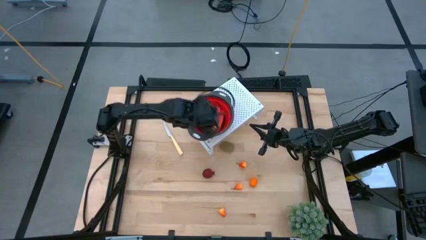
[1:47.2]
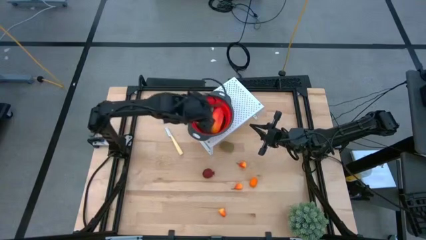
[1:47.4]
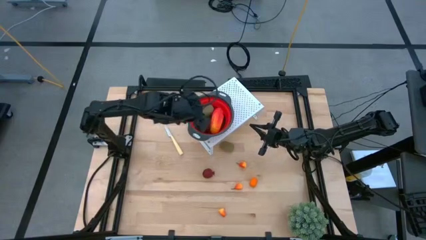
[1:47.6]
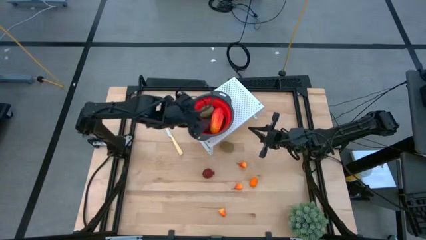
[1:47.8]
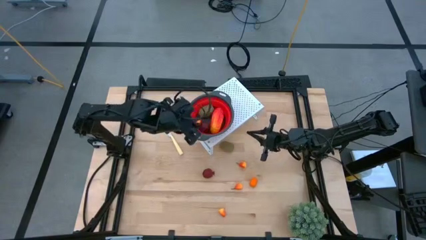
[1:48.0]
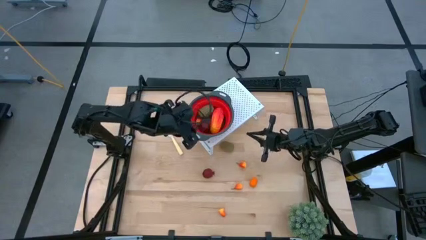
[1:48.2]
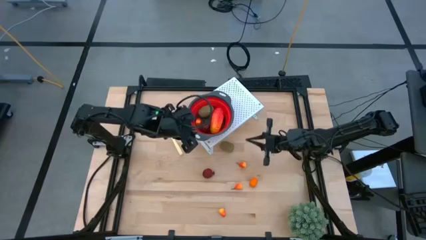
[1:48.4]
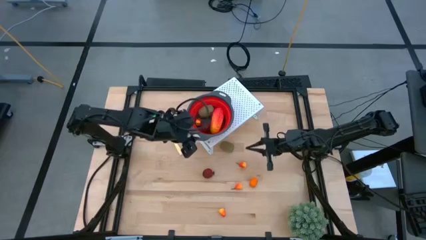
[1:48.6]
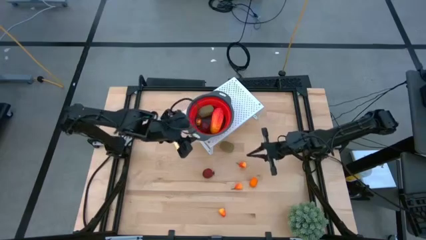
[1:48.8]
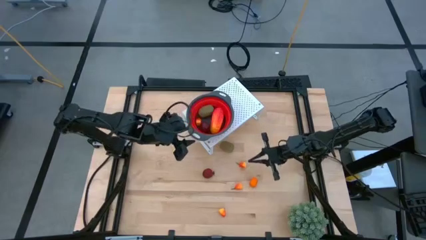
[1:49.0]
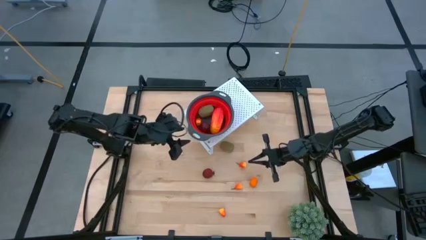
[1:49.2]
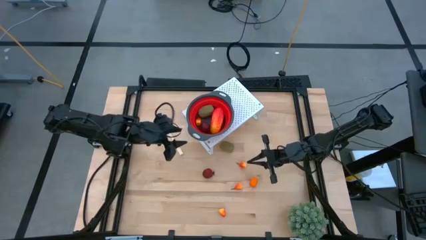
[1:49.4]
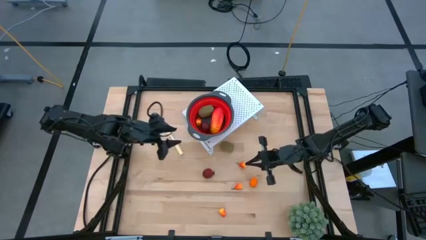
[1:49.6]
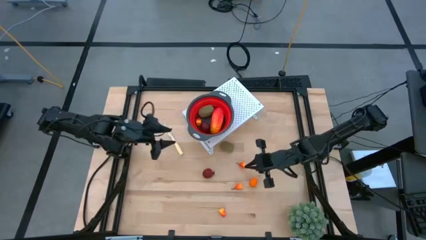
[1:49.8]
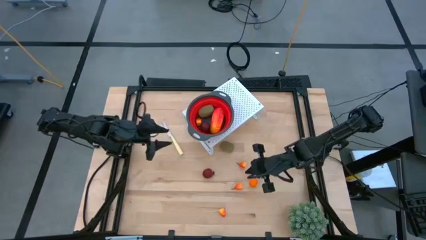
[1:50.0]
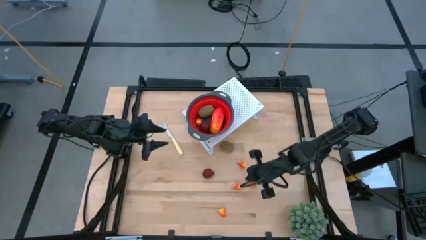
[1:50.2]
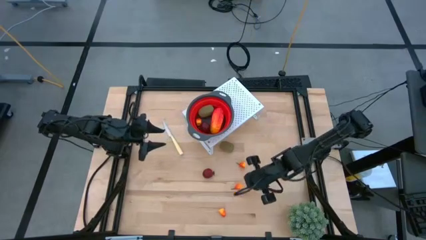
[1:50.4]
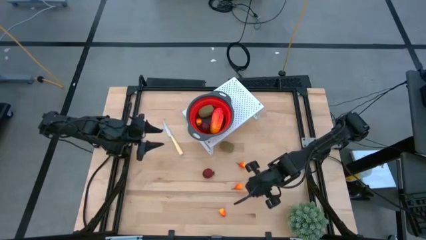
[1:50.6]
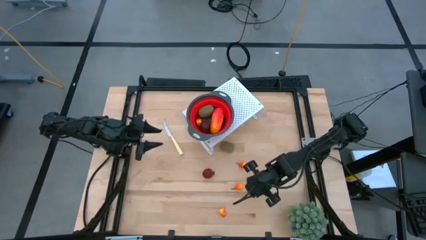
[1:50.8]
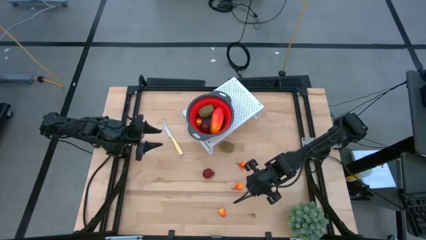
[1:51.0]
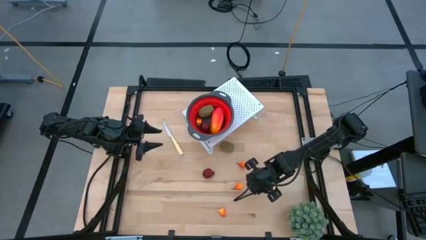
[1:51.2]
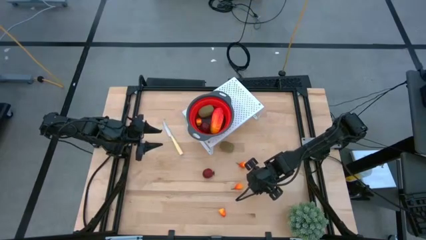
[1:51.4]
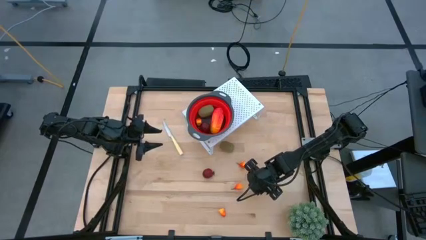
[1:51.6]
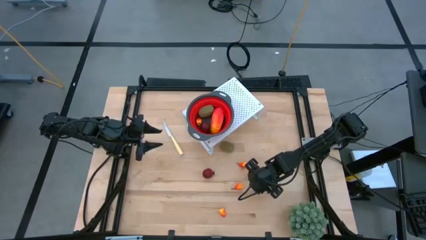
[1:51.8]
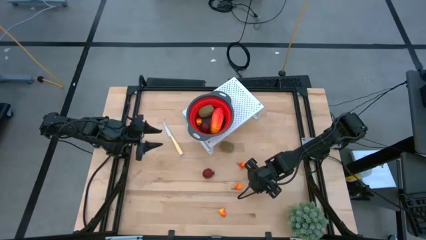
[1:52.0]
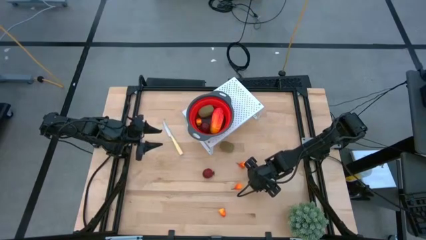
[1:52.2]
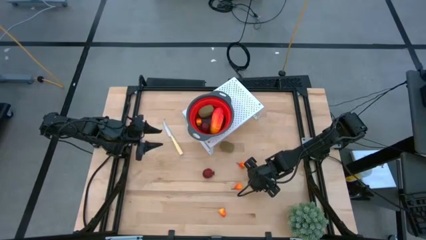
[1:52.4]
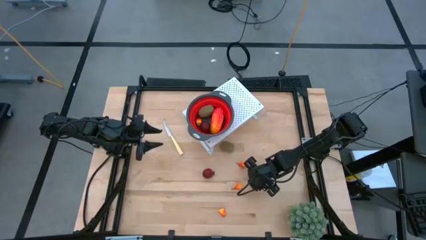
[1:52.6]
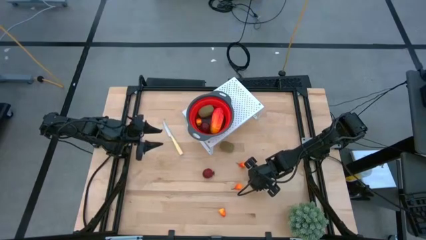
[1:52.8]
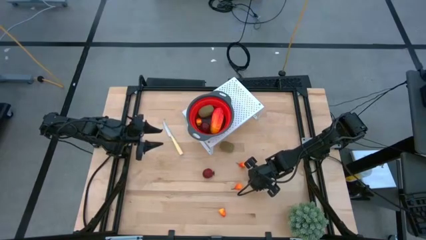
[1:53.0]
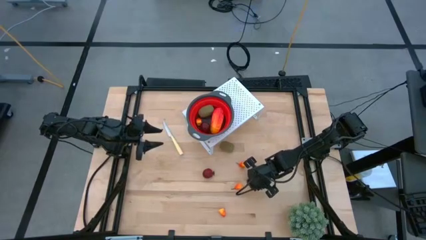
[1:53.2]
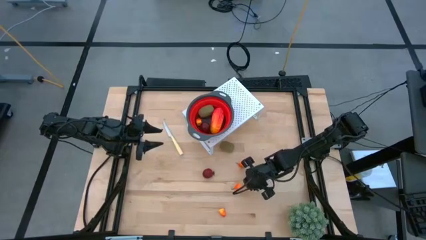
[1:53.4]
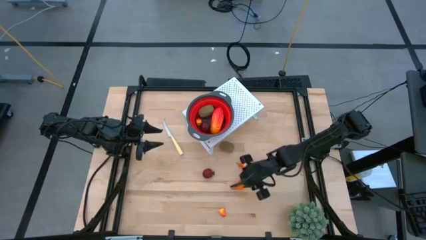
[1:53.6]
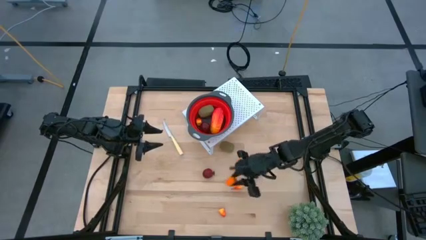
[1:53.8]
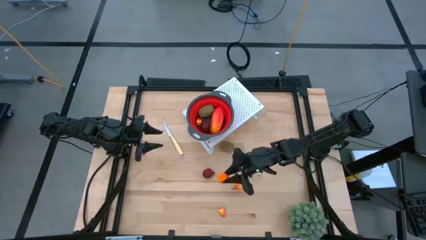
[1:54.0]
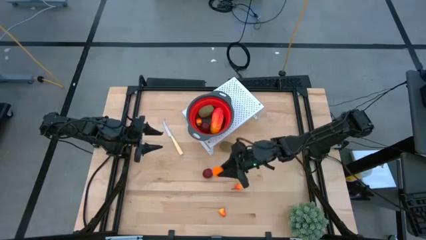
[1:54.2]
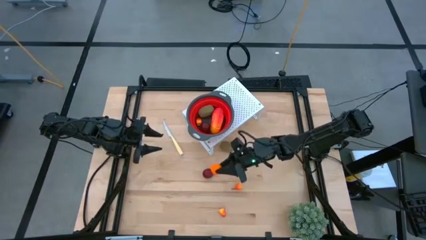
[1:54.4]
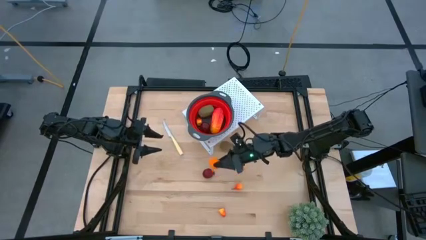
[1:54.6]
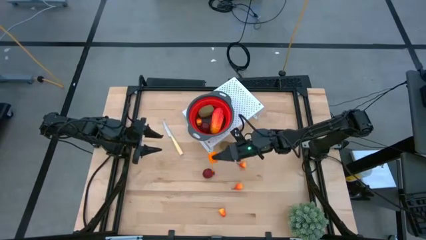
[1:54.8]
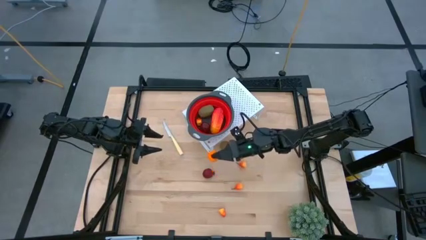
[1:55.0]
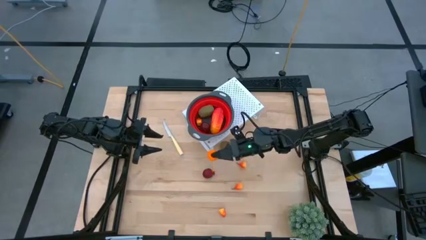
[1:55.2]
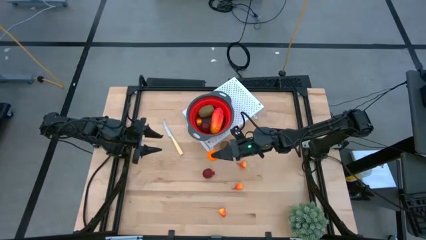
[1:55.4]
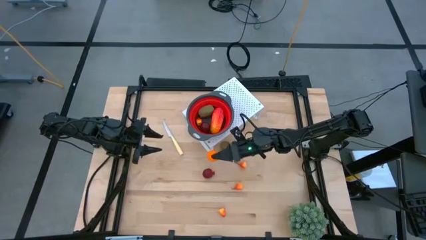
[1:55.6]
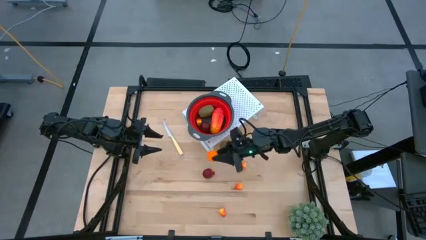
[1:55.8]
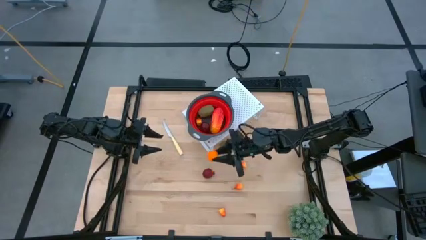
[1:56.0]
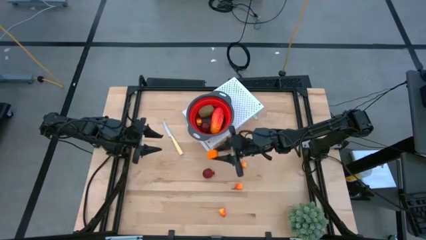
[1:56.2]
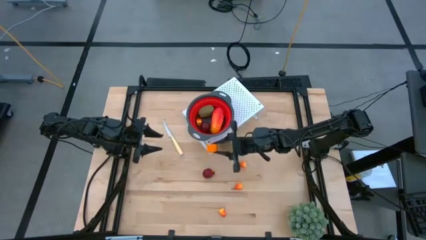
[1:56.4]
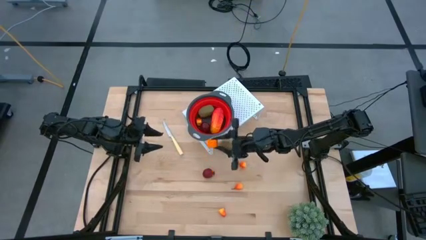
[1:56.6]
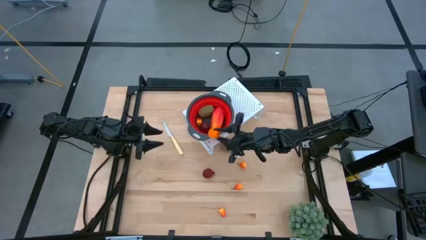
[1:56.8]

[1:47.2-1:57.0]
Task: Pick & Place Fruit
Put the tangerine into the red strainer bowl on the shelf

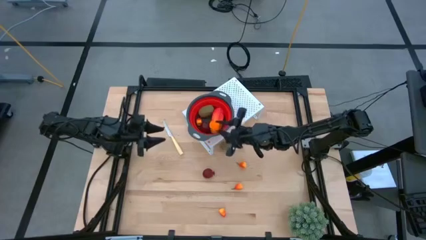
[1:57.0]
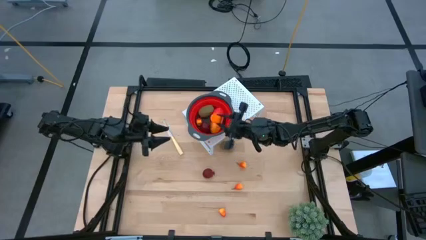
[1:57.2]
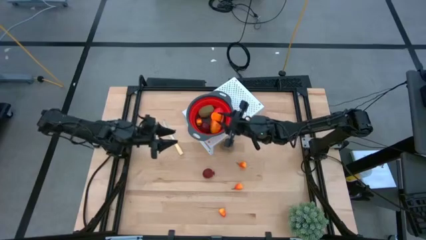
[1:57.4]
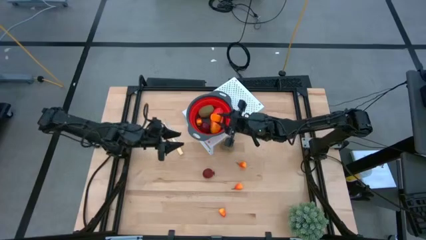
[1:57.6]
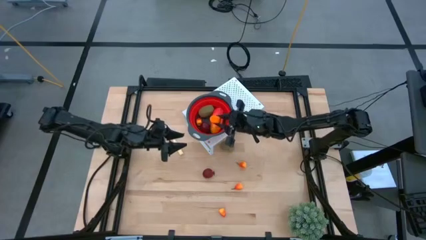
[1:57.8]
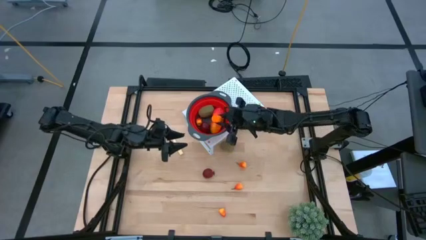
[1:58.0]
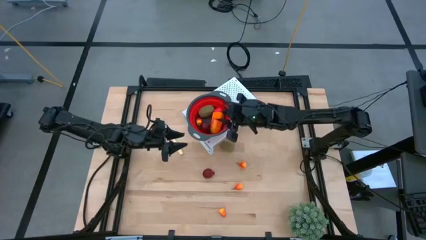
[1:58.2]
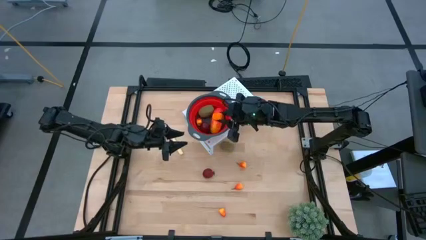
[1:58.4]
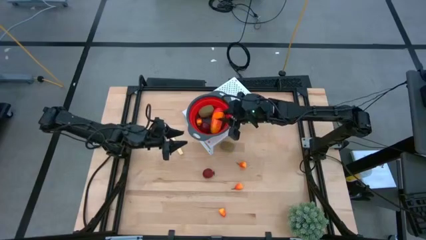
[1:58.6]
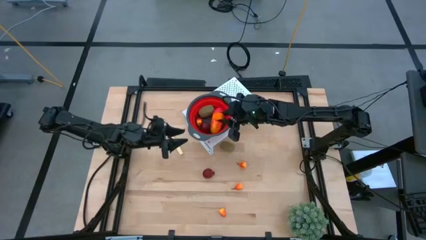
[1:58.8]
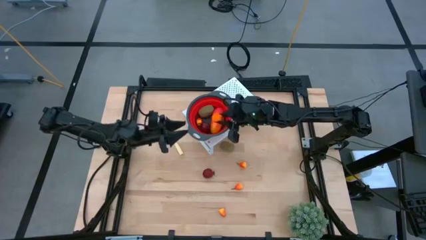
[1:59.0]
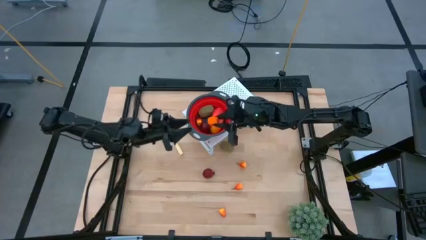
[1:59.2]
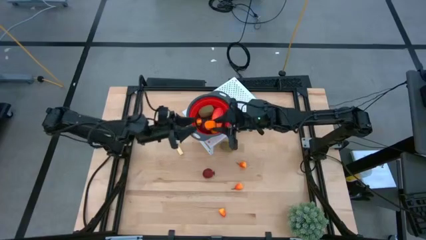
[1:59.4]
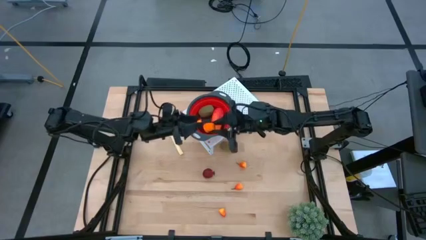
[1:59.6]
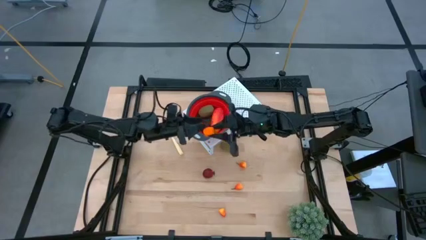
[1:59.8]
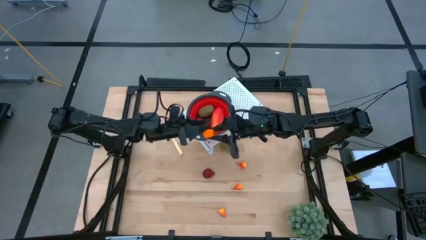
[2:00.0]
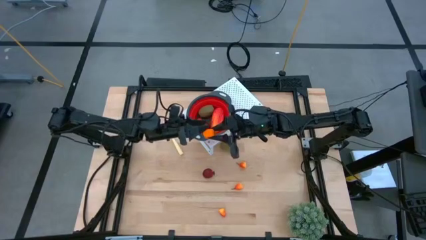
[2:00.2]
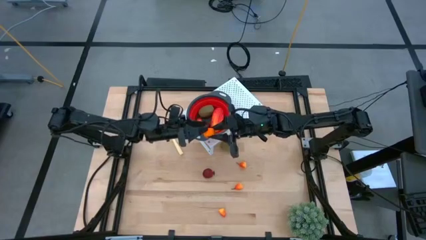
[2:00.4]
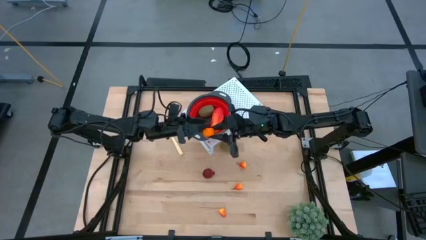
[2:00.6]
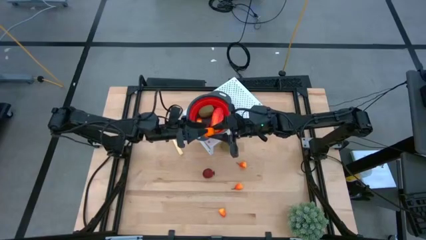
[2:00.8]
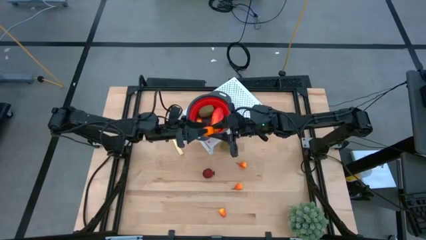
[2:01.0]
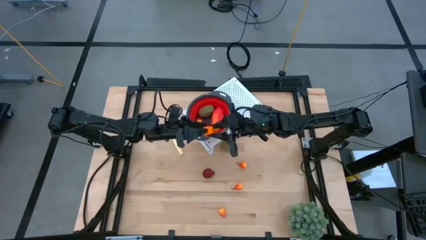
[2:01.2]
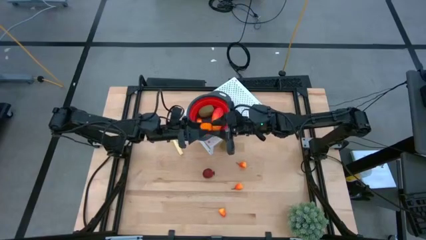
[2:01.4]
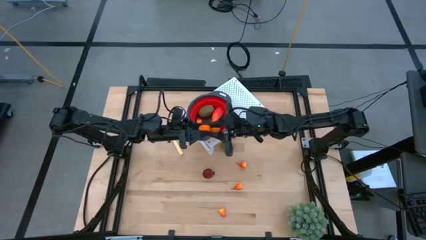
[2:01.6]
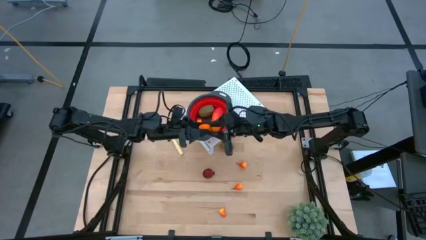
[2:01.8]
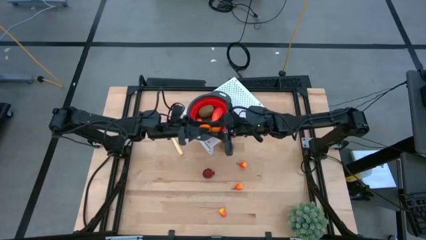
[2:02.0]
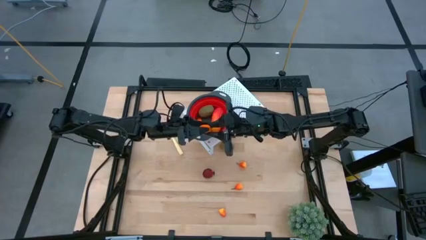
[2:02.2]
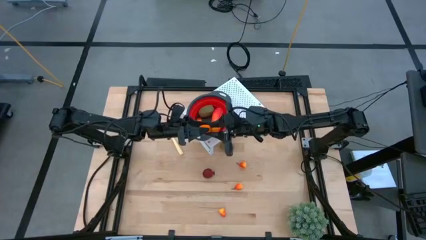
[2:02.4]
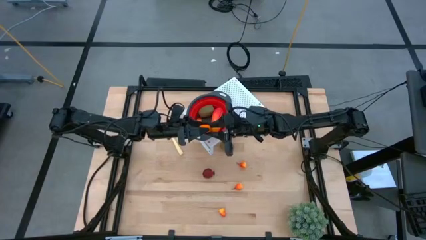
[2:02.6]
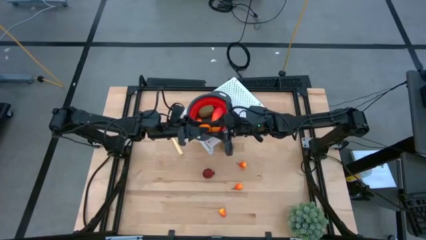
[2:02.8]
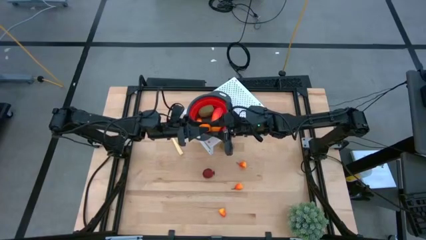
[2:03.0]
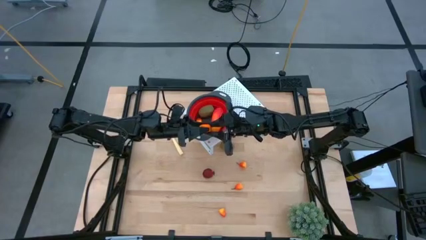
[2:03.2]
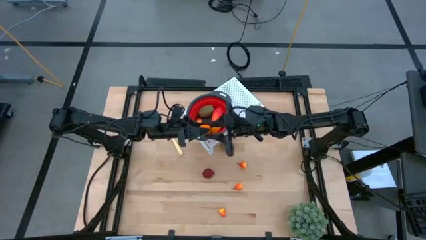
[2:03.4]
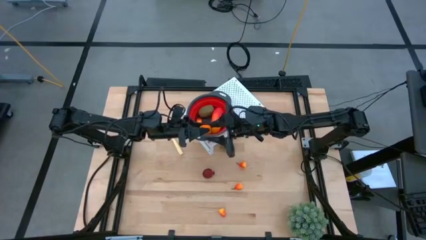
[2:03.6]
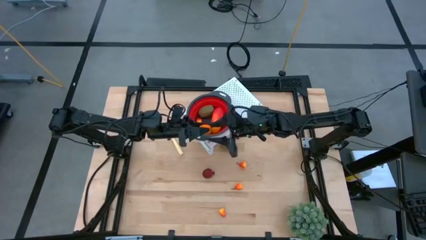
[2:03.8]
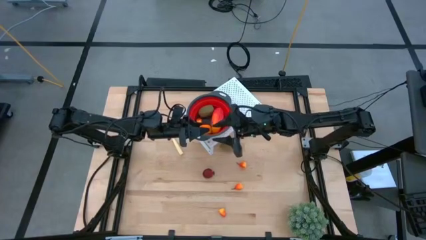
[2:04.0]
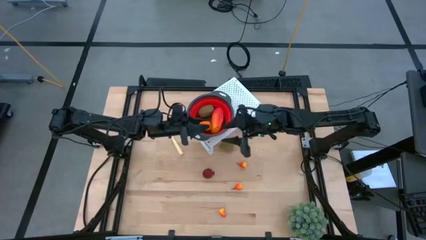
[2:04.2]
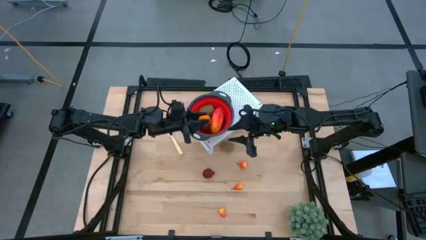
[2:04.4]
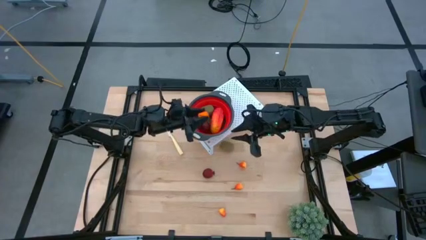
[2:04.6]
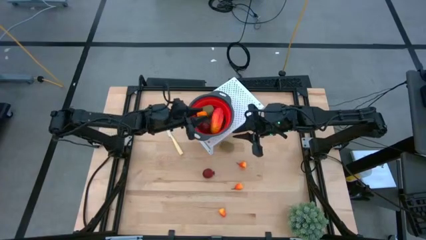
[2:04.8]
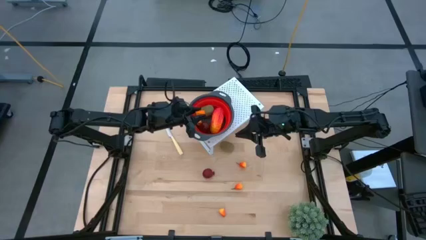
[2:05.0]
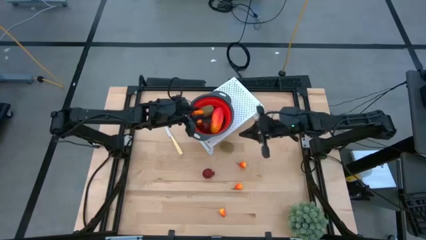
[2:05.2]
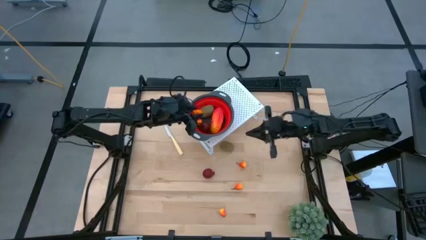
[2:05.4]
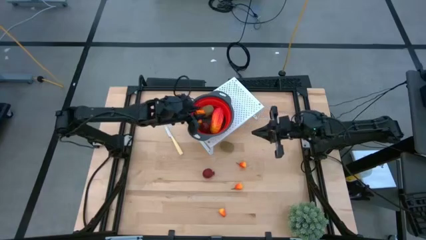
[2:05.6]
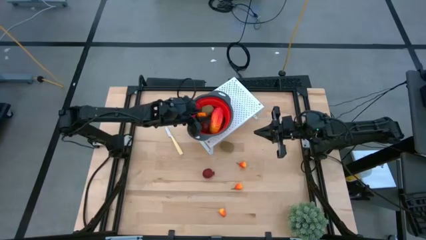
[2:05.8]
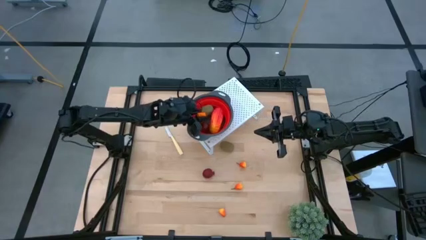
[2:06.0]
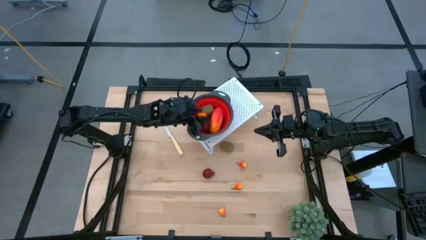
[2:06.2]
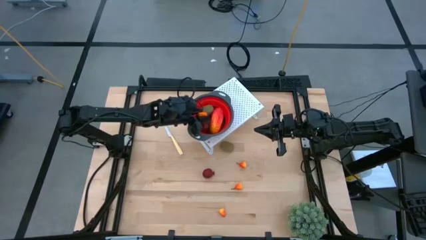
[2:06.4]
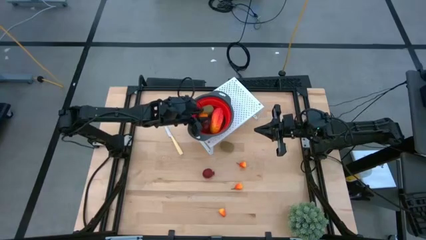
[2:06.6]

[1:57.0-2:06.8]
Put the tangerine into the red strainer bowl on the shelf
